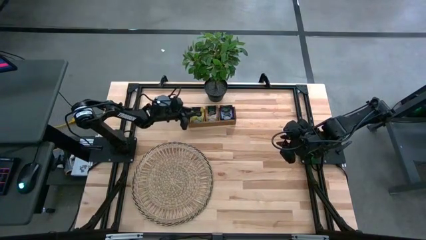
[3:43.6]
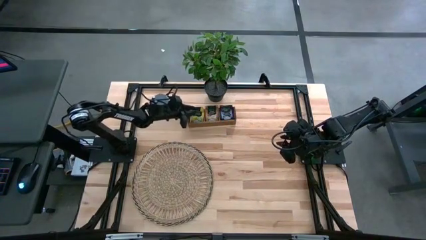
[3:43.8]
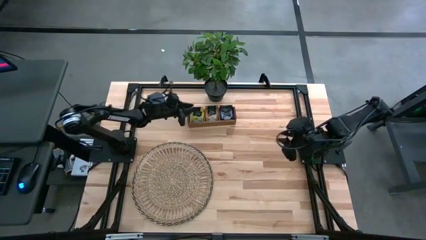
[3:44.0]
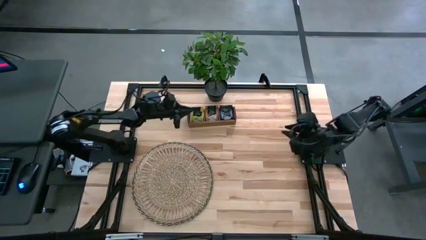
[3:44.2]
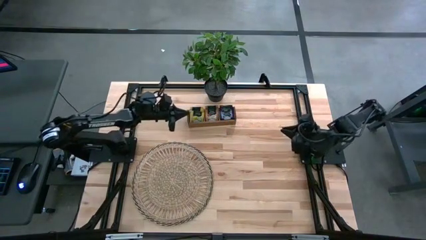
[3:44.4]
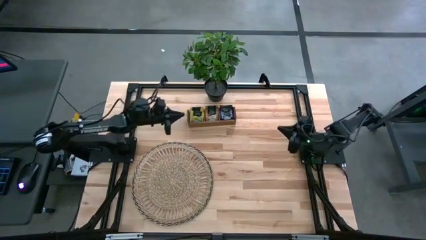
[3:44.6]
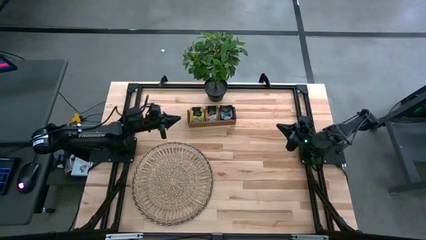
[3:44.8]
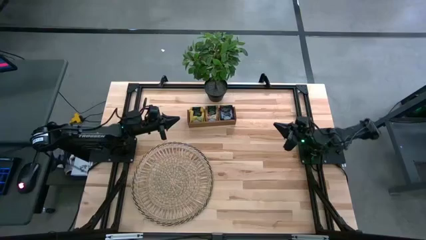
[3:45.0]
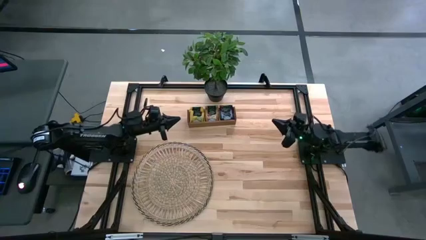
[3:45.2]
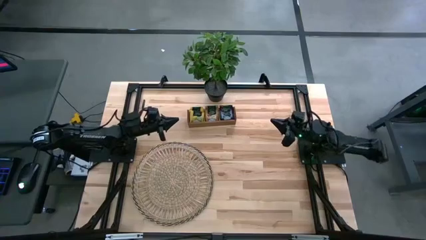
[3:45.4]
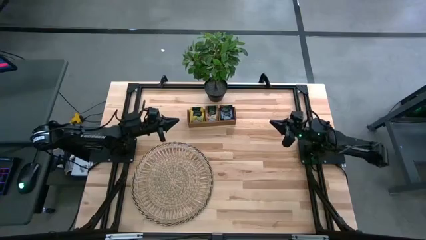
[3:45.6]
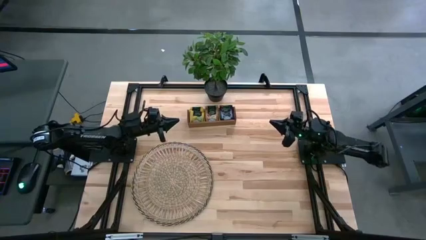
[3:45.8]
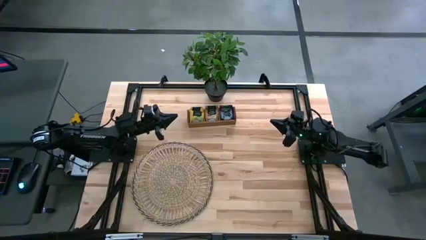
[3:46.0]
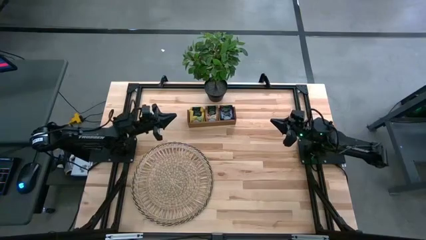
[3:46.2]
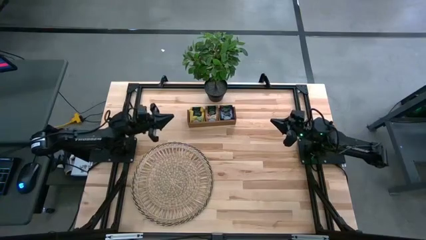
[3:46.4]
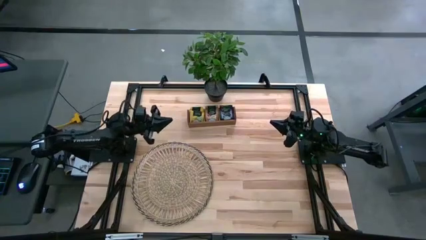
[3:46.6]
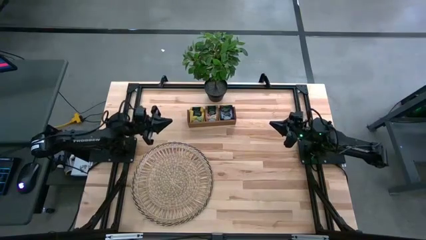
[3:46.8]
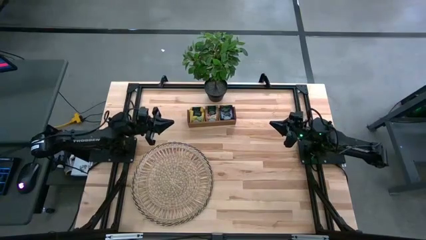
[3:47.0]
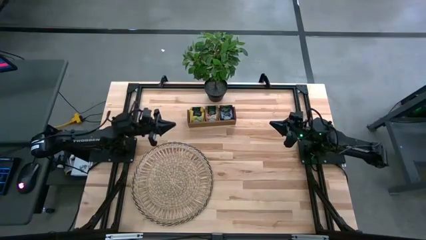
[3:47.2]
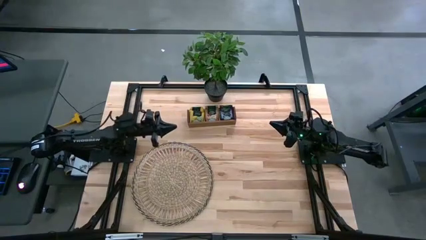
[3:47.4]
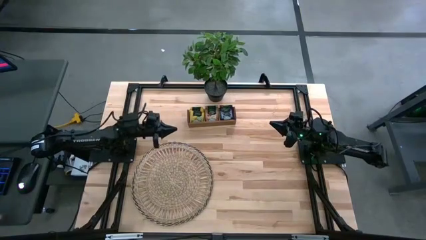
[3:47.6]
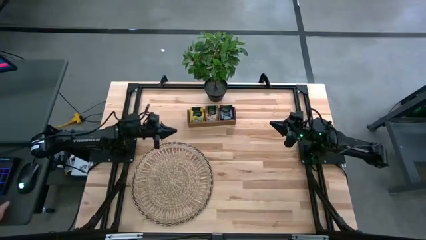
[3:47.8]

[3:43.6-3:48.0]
Task: Pick & Place Tea
Return to Home Position

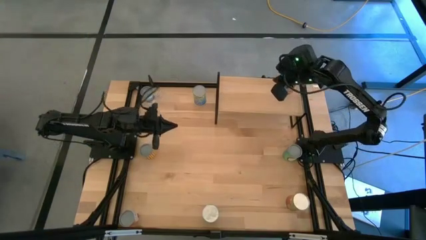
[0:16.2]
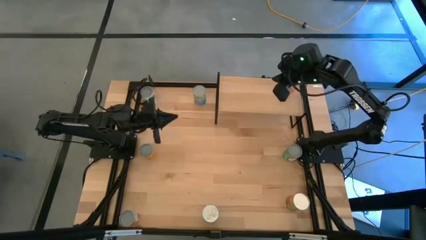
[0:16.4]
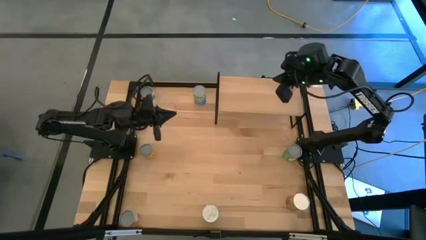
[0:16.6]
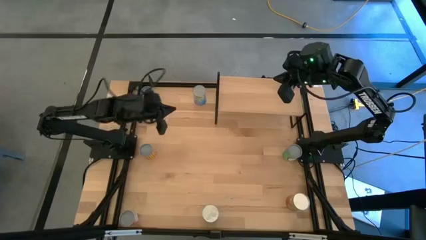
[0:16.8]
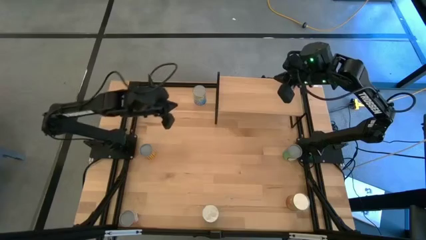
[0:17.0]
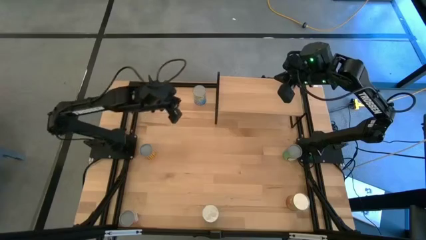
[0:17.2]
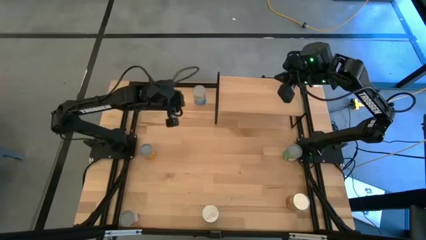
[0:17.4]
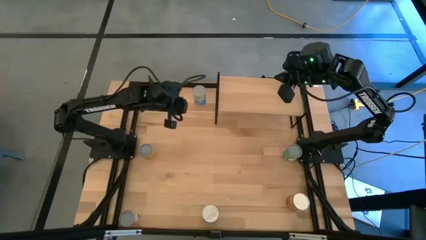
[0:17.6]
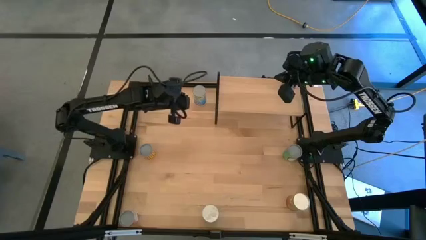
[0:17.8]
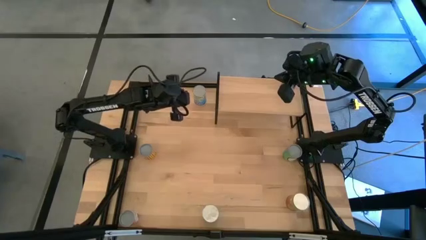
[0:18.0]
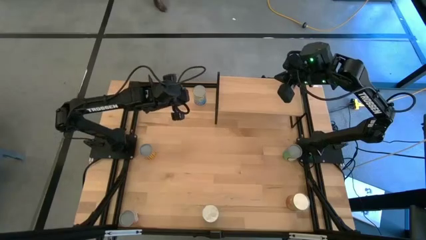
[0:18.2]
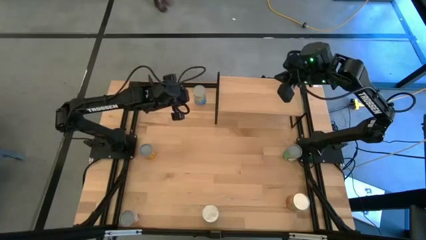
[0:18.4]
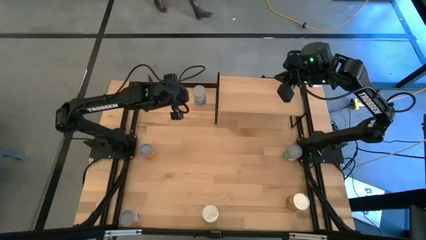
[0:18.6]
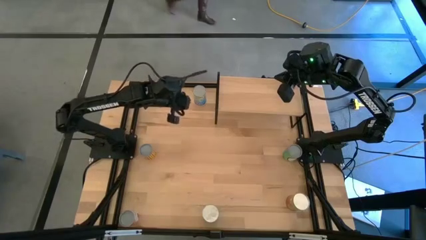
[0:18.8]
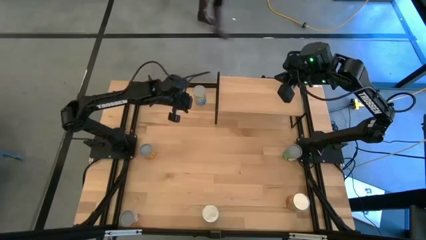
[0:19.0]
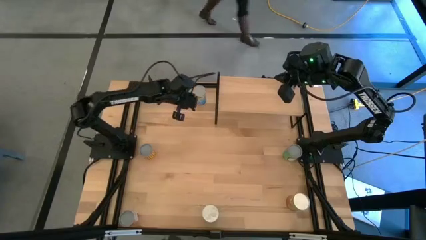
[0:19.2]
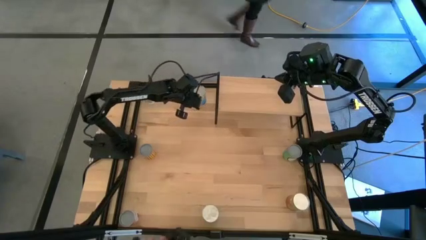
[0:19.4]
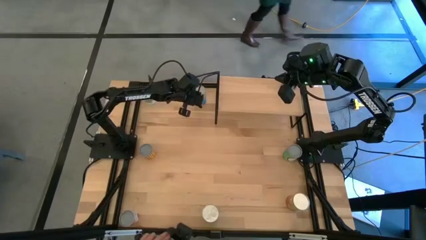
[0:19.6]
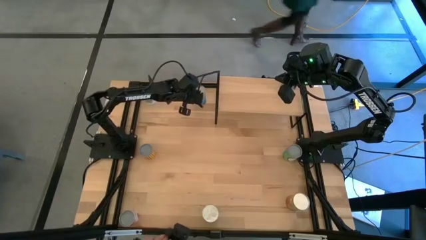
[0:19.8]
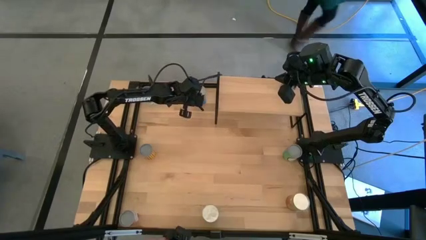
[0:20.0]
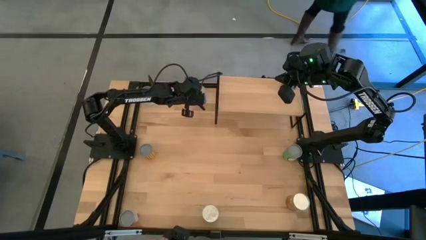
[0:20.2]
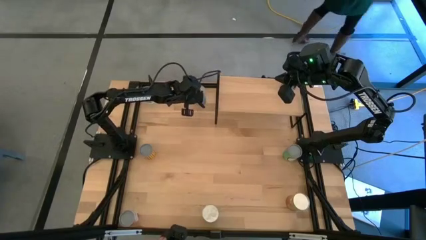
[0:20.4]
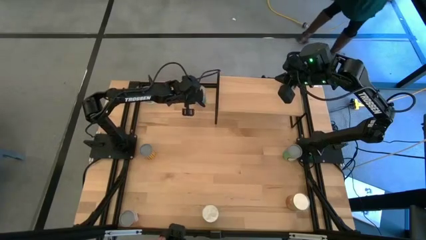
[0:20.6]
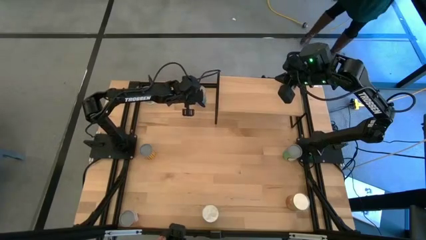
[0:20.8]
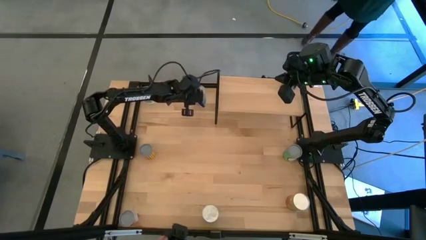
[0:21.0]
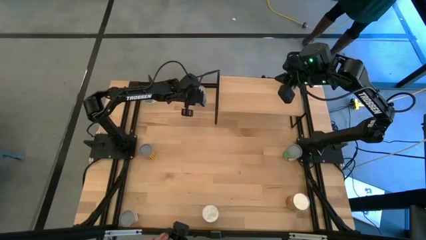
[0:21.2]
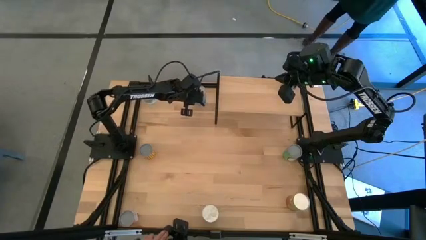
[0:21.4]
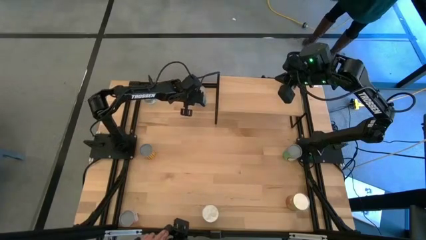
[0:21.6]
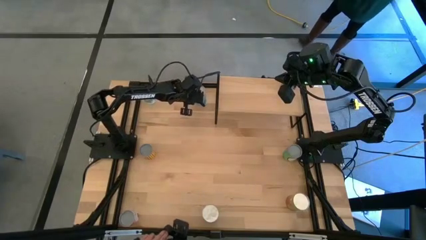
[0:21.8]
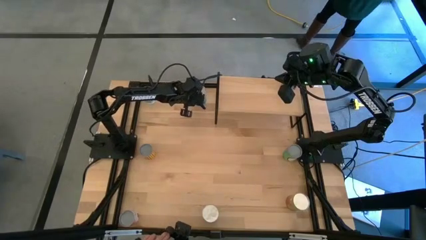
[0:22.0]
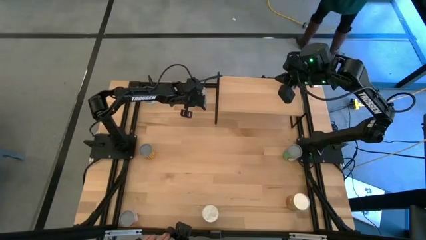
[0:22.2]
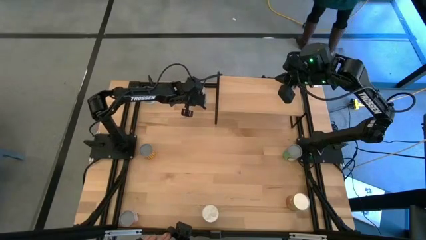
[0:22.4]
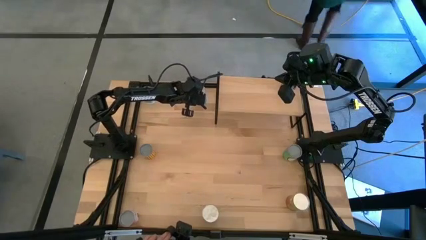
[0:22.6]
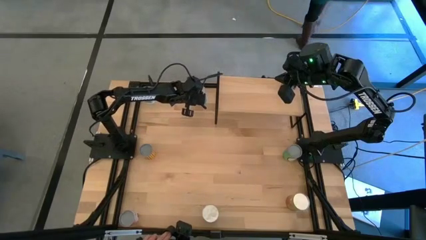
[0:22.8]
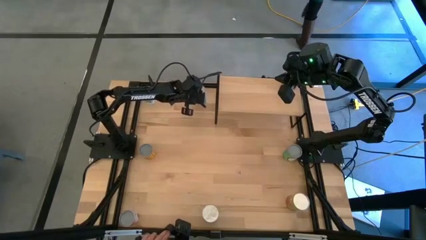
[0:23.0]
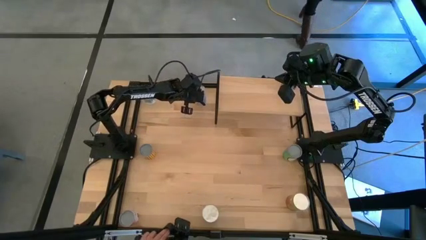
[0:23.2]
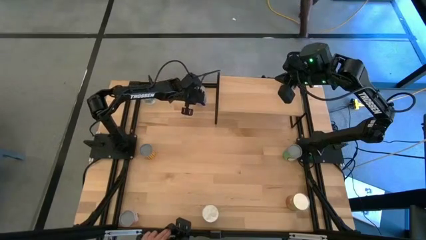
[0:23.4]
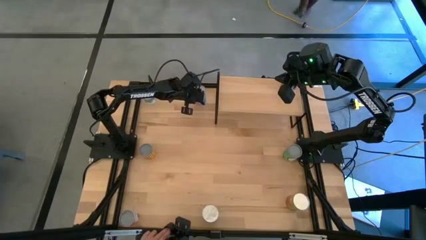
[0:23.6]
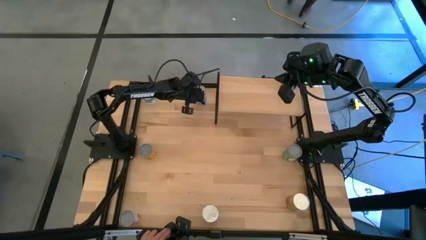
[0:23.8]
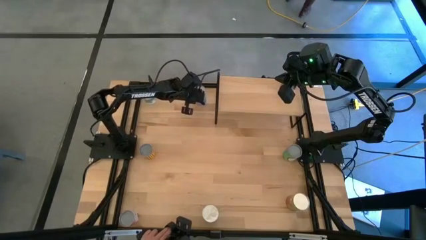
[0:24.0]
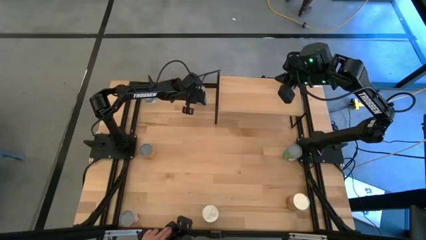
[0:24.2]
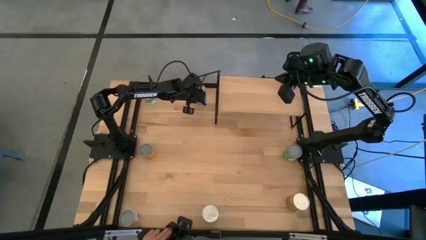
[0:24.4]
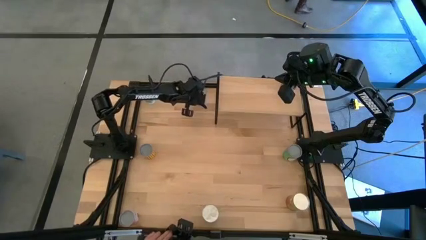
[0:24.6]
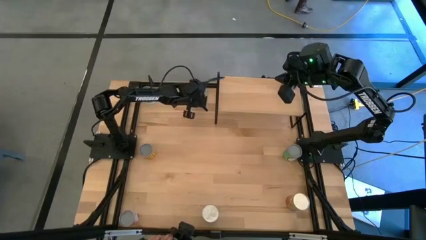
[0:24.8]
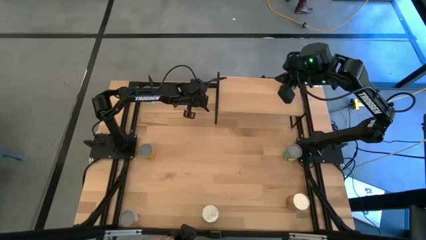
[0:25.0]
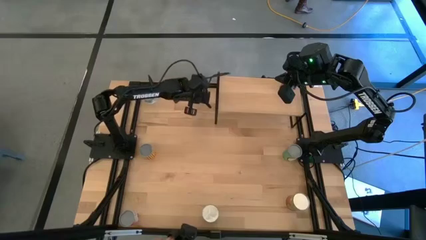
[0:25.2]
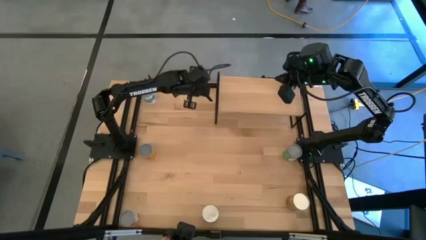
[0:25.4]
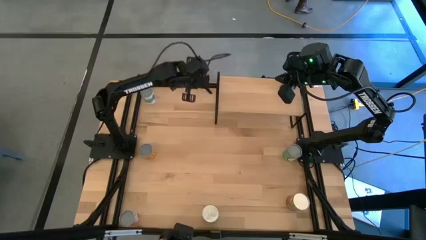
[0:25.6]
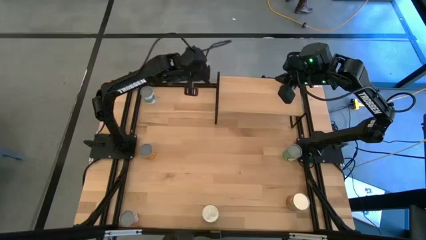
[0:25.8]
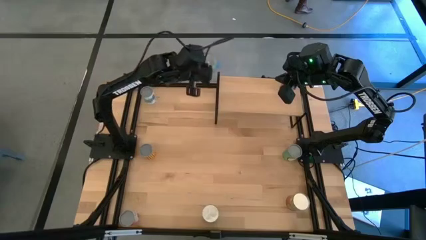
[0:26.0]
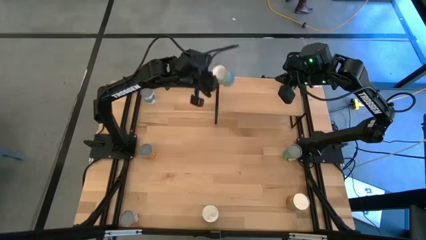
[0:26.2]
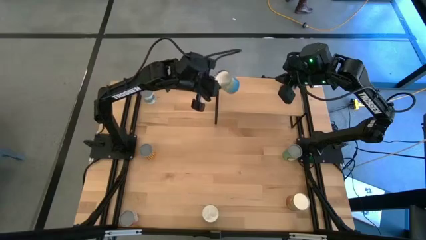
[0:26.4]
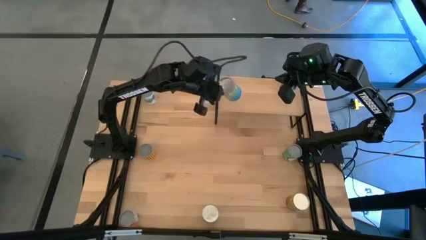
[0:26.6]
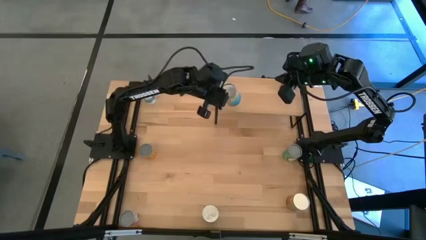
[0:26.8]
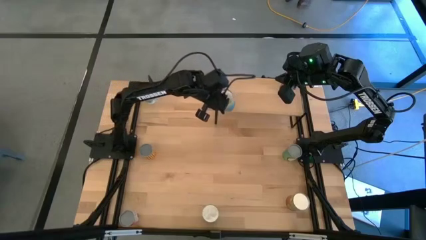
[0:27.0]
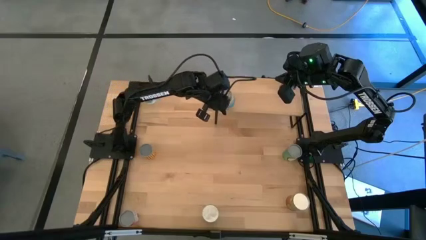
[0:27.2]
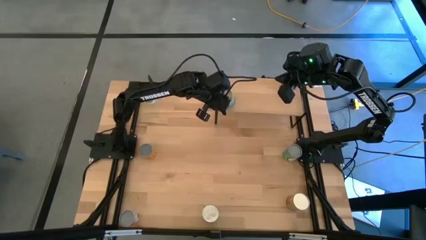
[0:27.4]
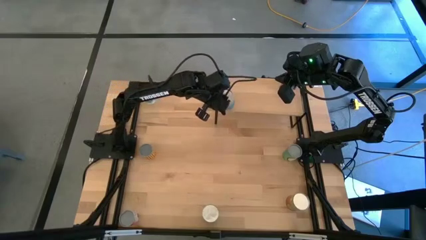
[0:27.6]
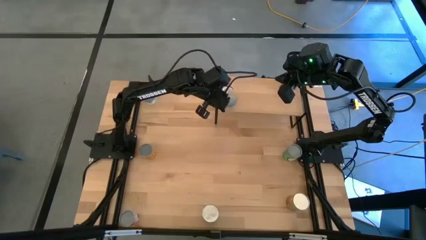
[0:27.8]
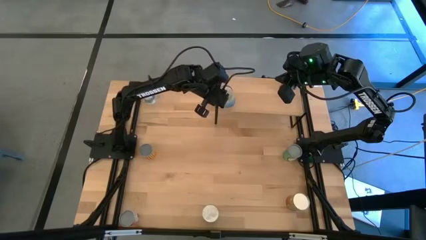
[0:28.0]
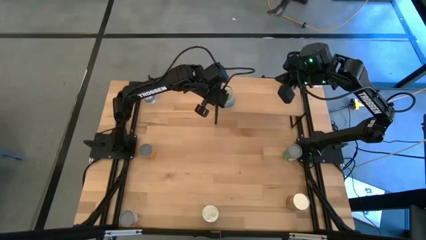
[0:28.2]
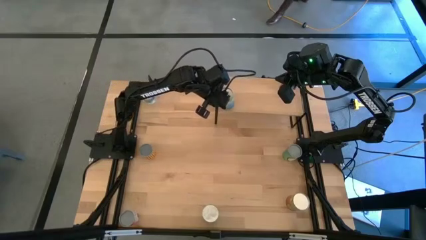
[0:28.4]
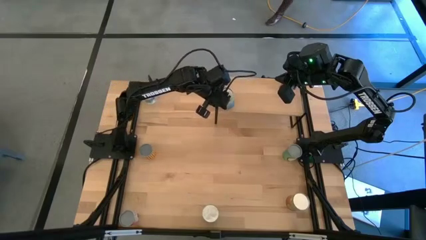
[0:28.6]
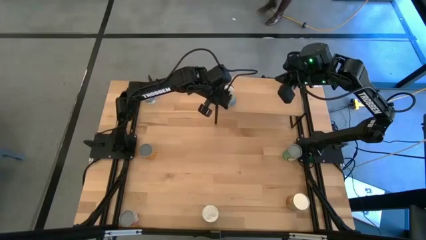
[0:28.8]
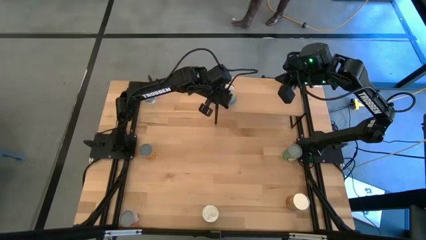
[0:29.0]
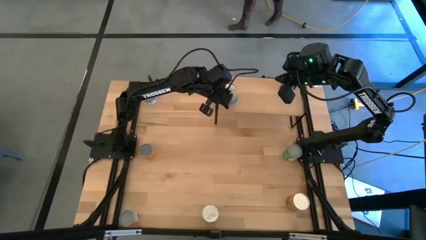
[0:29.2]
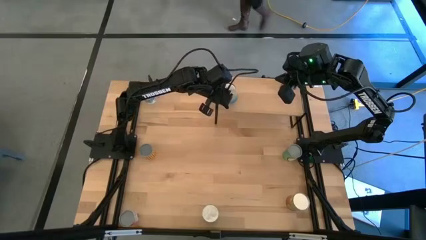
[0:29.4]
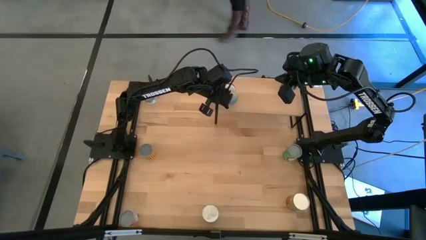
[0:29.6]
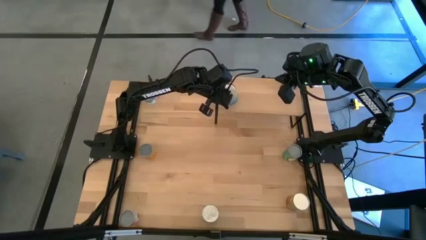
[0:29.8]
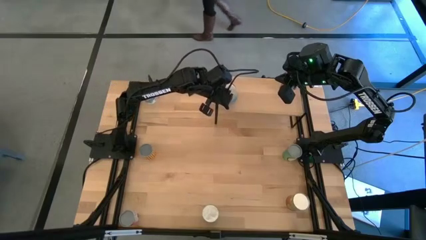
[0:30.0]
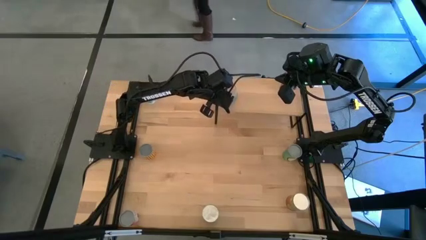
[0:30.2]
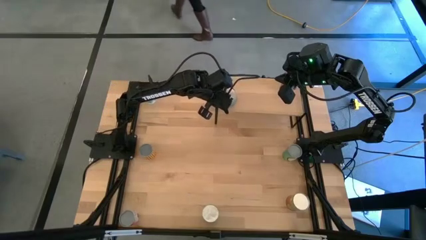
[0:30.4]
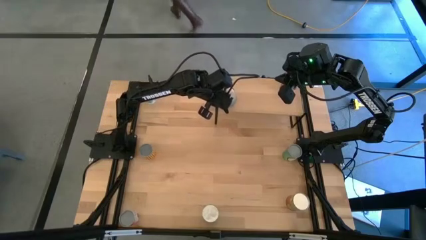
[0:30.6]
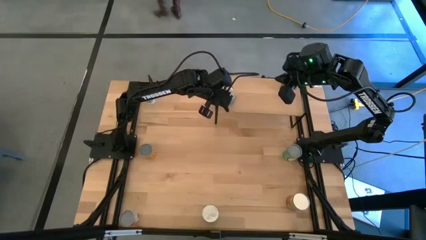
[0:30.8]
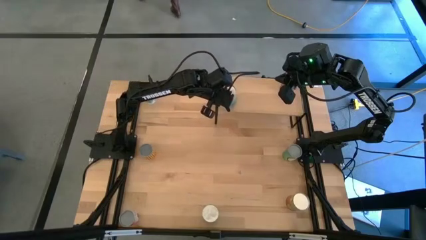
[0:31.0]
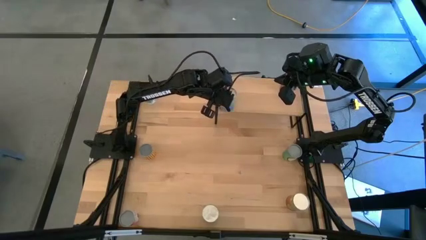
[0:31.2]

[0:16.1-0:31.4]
Task: Pick and place cans onto a shelf
Put the top blue canned good on the shelf
